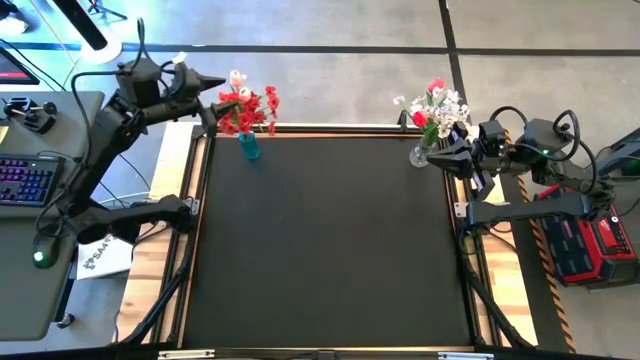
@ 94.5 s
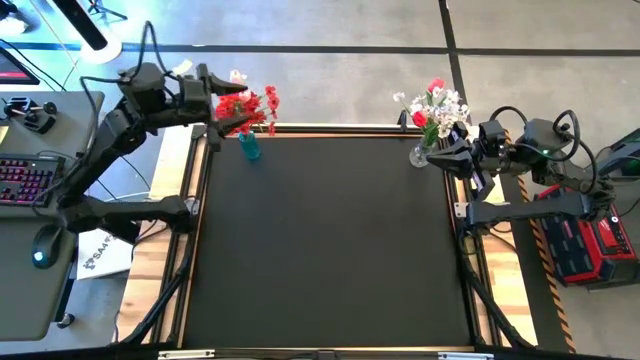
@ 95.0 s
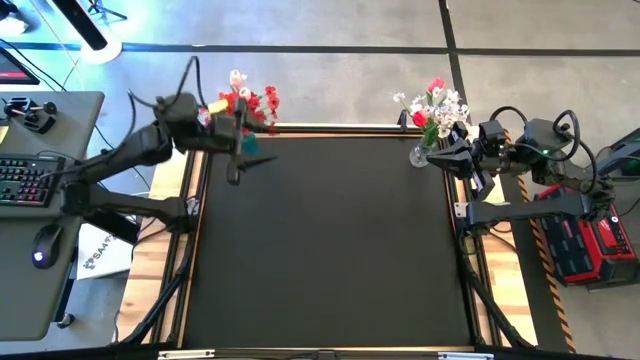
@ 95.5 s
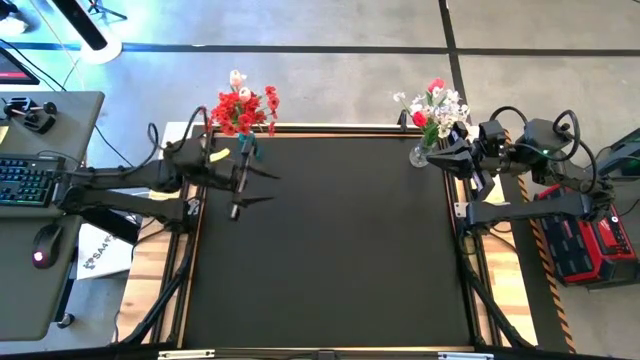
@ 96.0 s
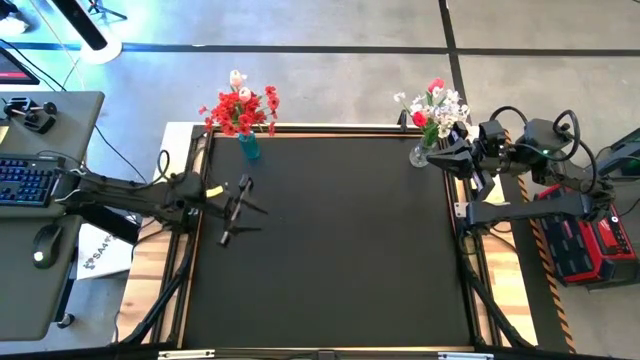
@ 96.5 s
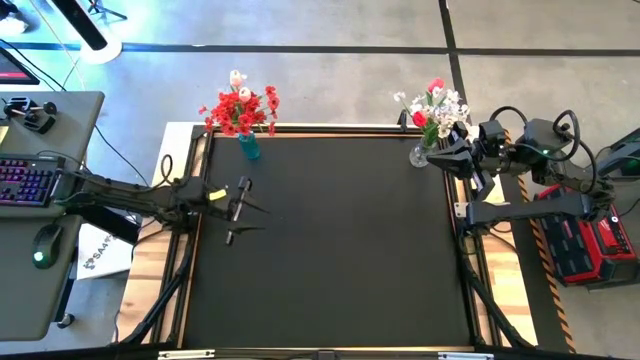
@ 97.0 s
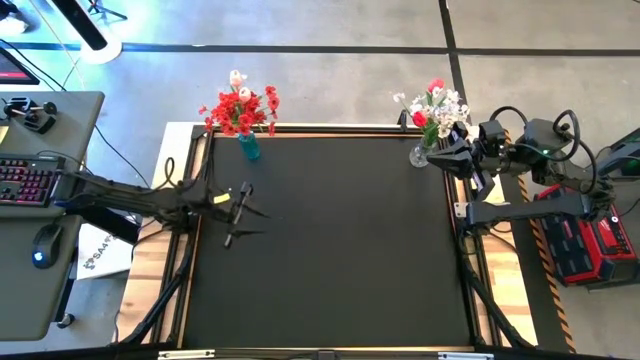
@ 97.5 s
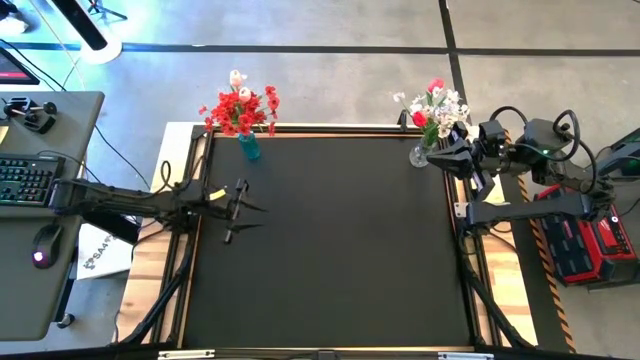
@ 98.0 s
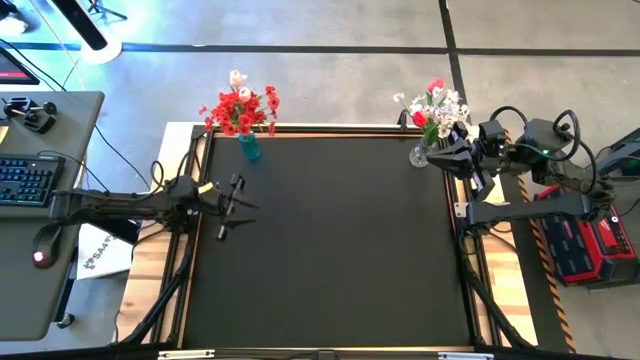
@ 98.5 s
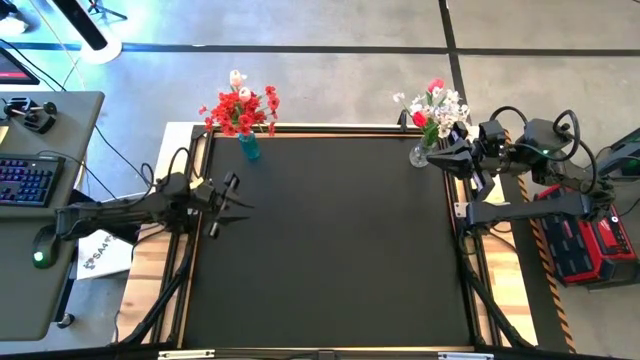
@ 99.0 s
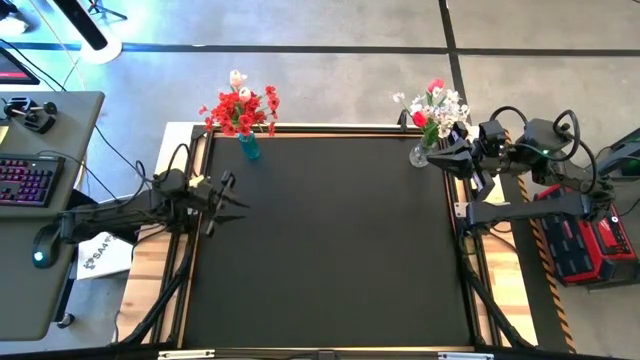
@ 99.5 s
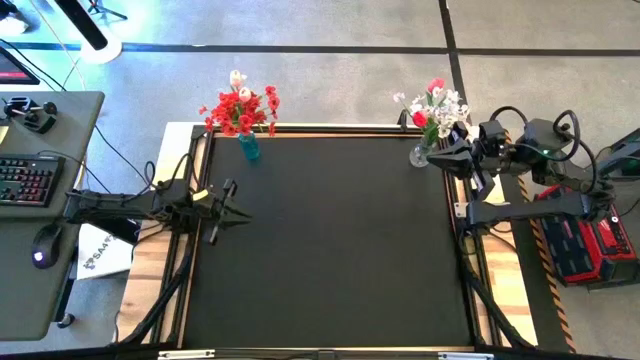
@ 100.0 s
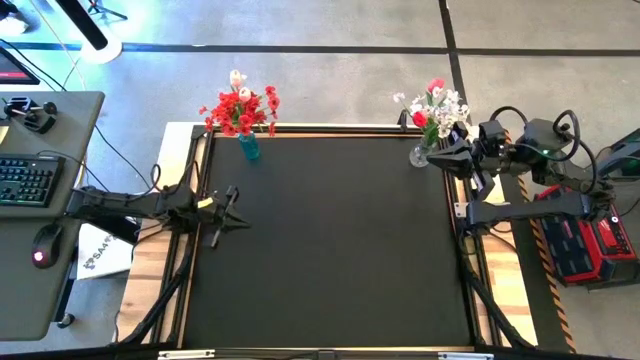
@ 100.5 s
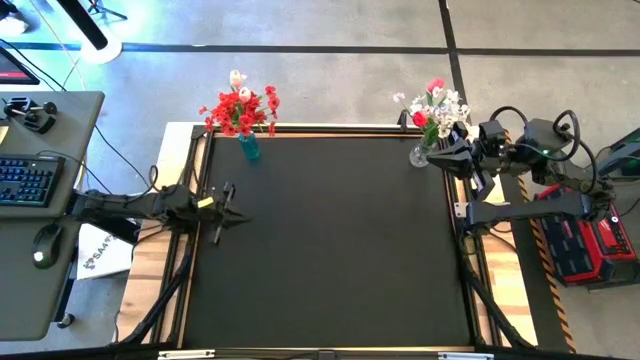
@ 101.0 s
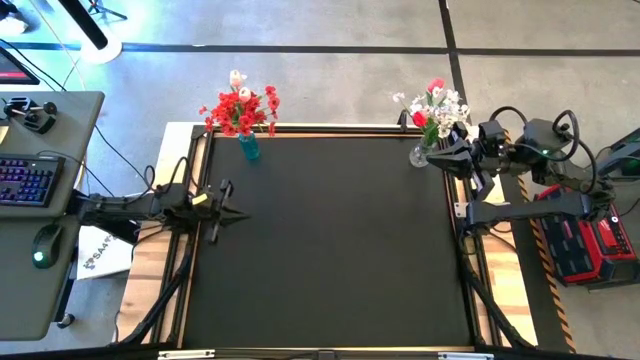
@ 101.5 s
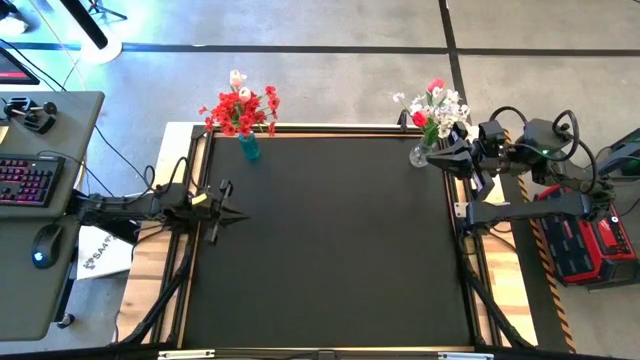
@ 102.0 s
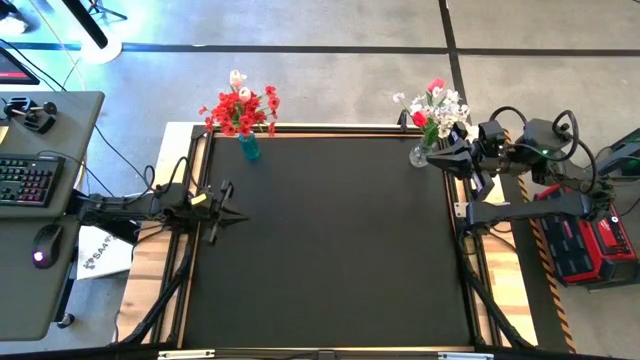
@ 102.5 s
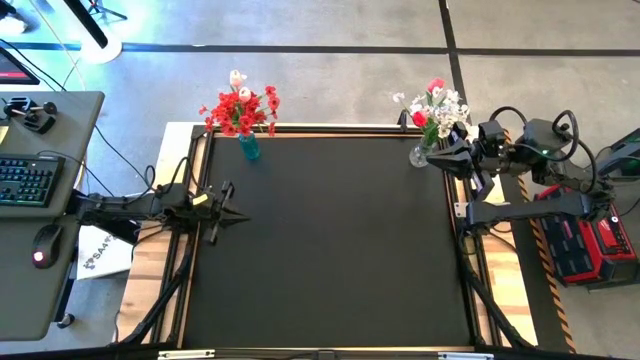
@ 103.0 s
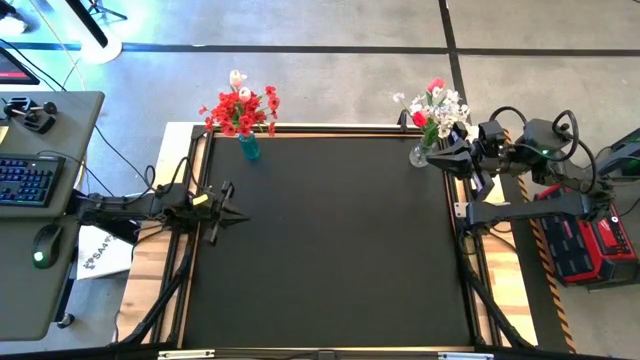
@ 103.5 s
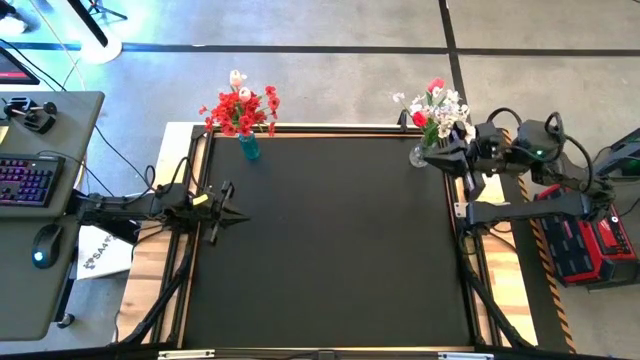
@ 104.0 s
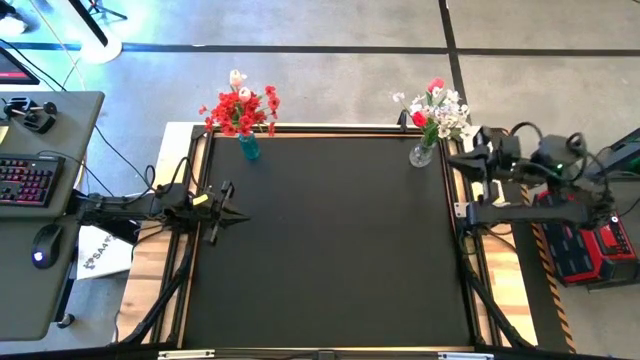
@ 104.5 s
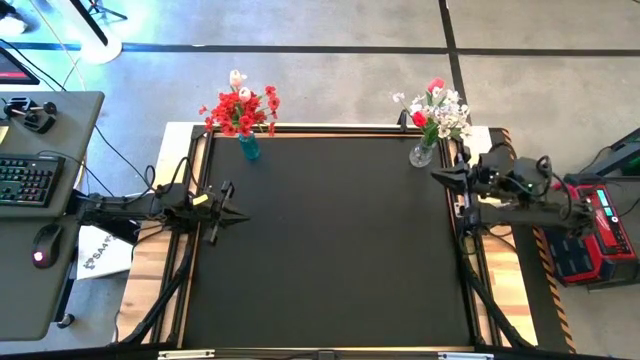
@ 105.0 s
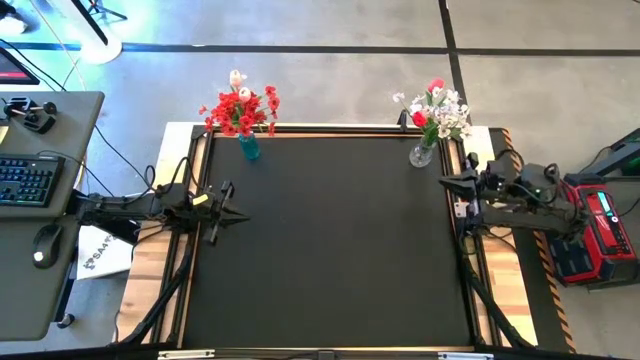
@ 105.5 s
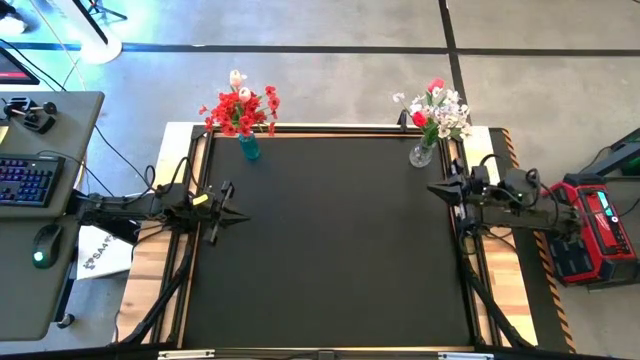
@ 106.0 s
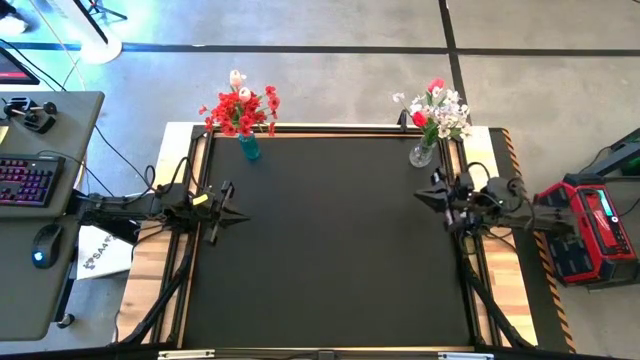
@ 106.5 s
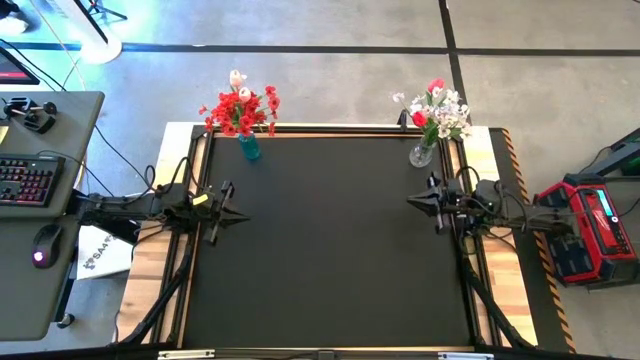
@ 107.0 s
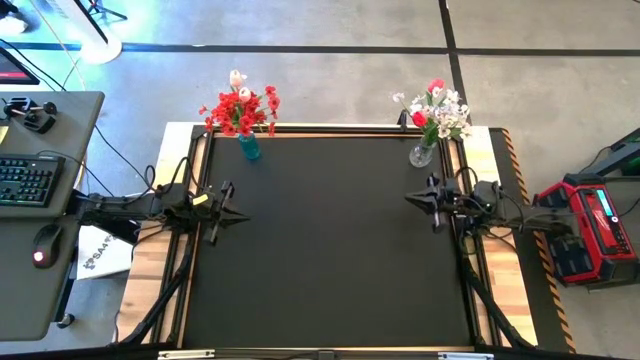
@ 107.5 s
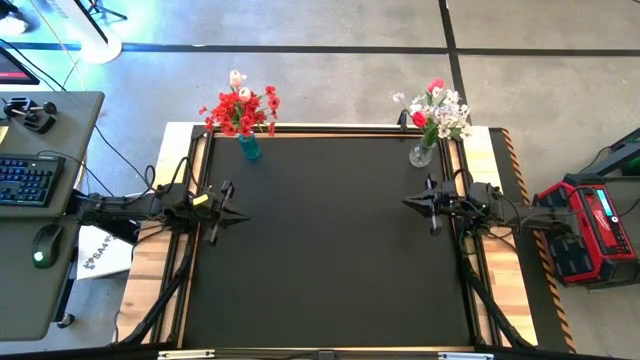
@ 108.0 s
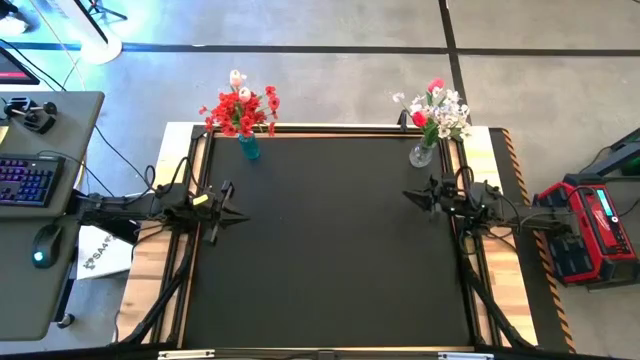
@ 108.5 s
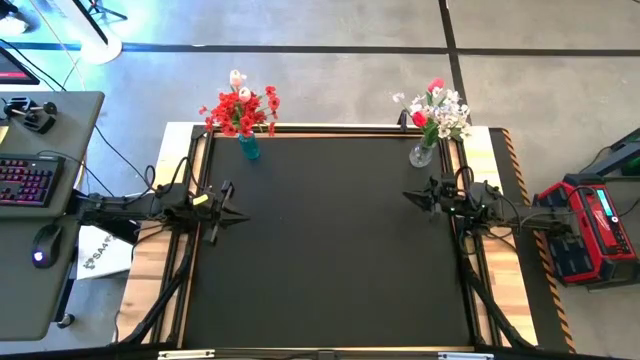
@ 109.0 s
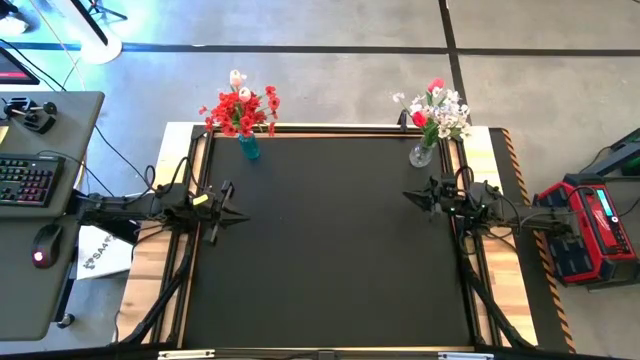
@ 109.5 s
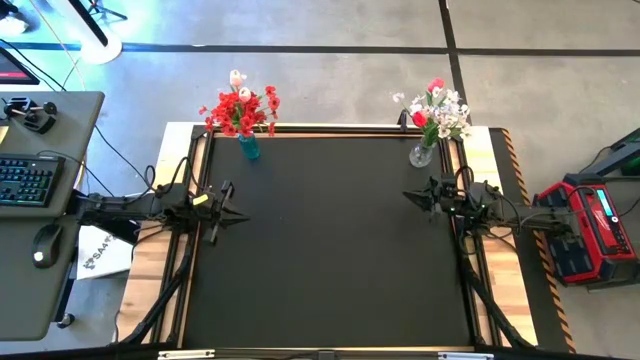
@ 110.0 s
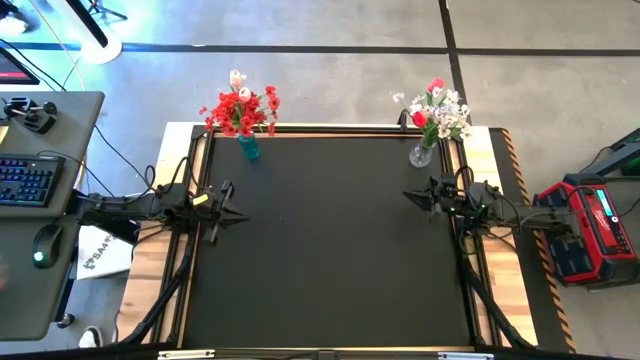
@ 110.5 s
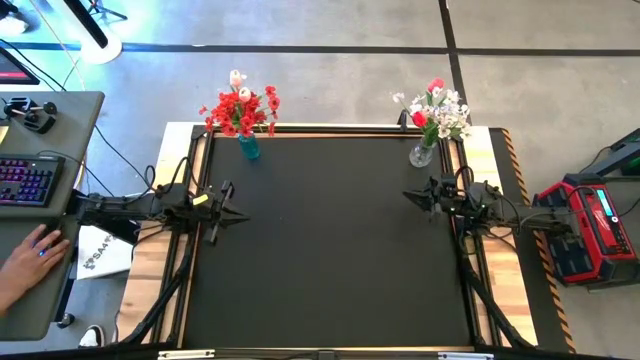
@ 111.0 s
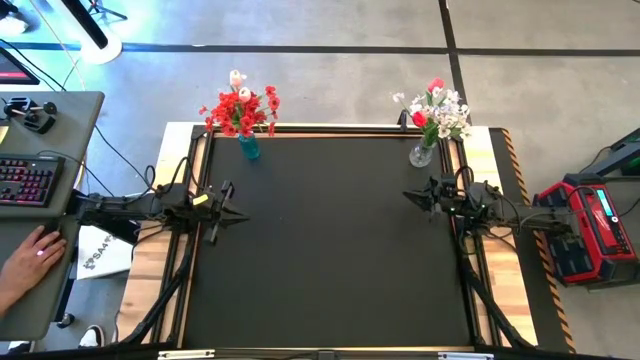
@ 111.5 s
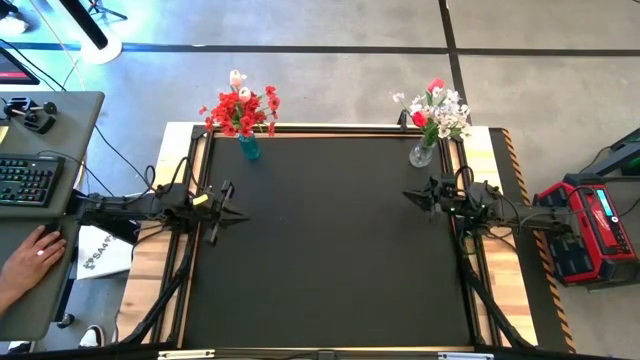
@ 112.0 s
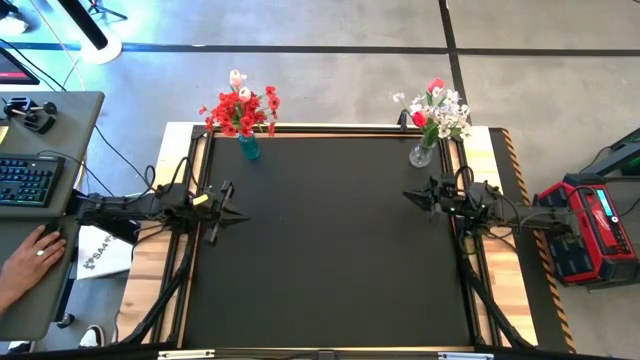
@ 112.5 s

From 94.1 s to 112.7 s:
Task: Sort flowers into vase by color
Return to Home Position

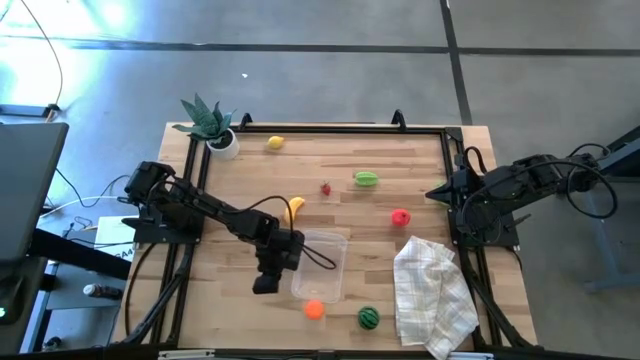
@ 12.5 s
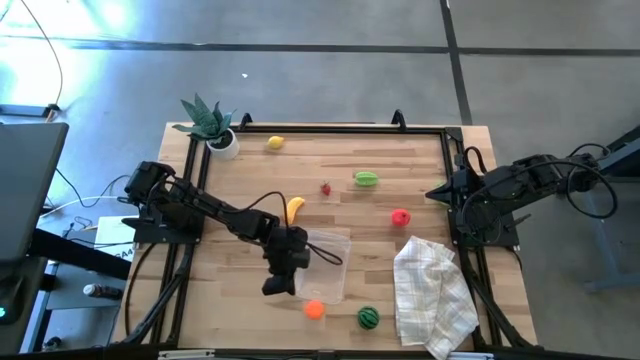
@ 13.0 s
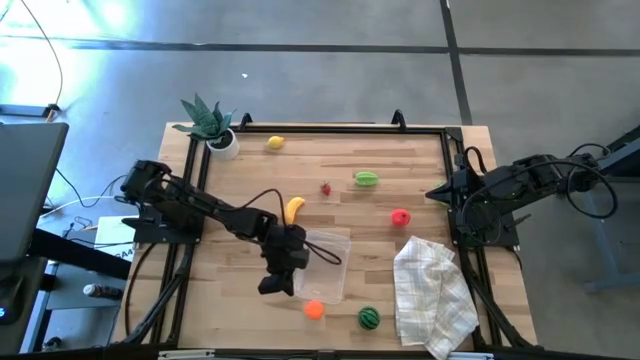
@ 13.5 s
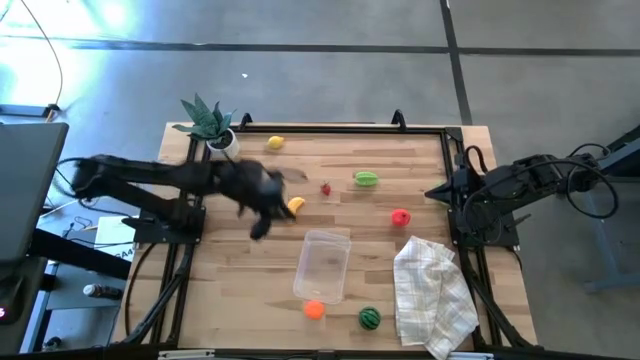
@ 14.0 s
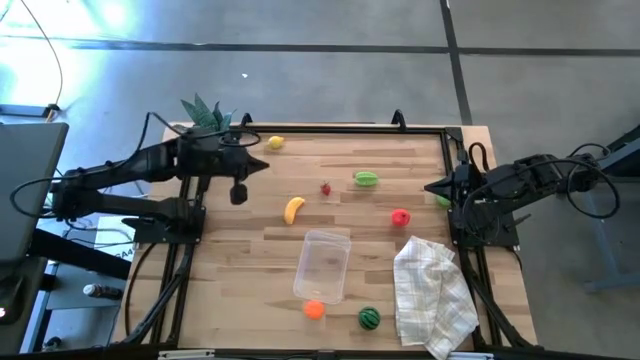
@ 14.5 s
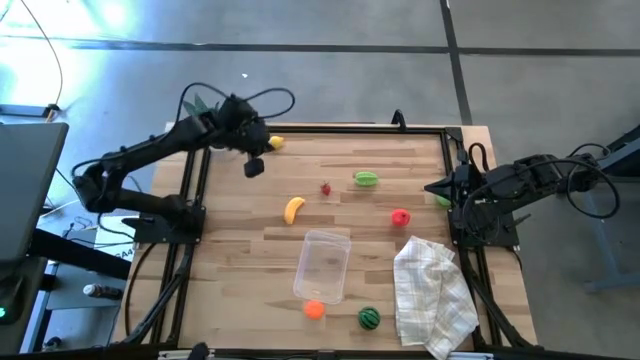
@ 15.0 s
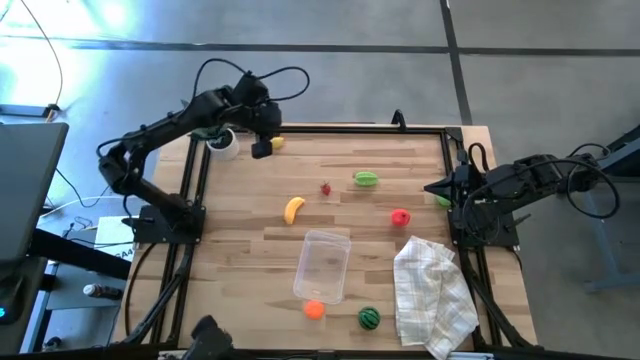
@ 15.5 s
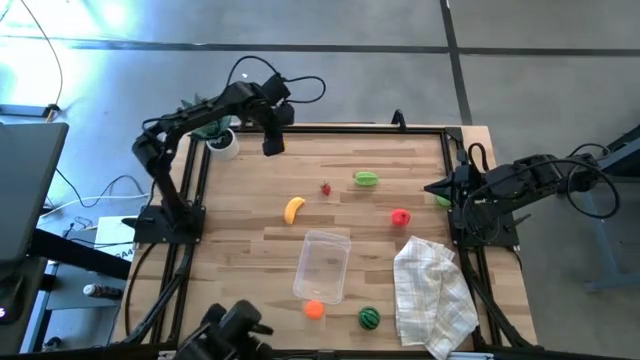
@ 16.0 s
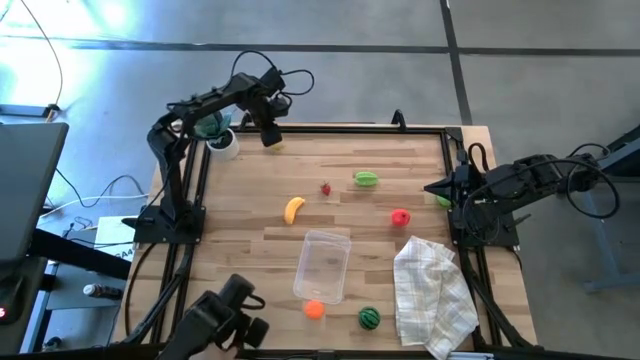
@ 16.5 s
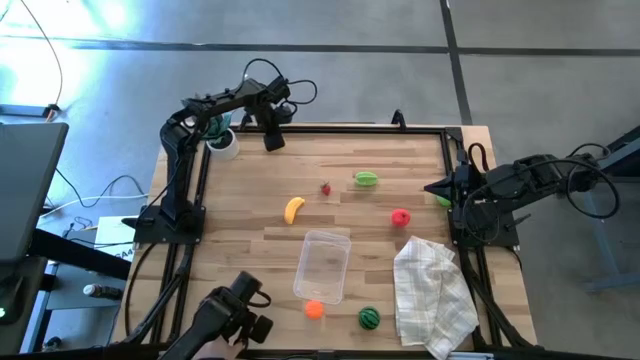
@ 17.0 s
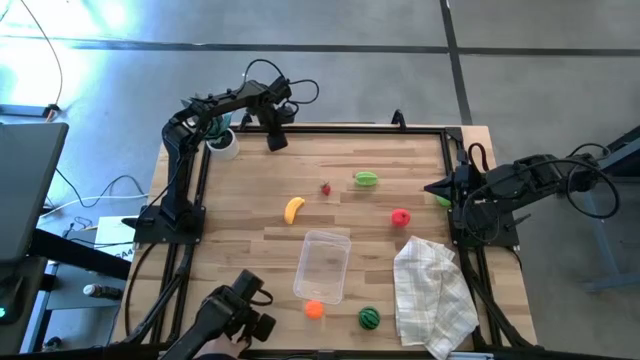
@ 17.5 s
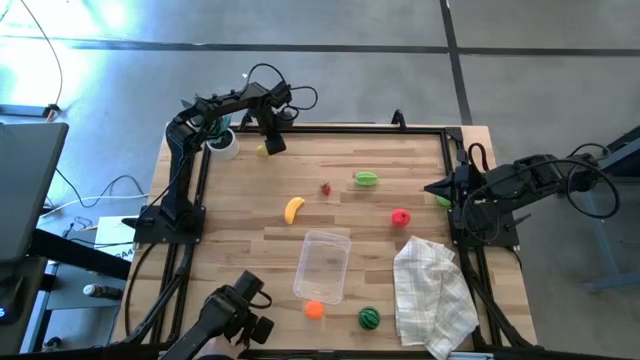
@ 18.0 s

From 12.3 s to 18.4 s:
Task: Pick and placing Produce into tupperware
Put the lemon into the transparent bin
